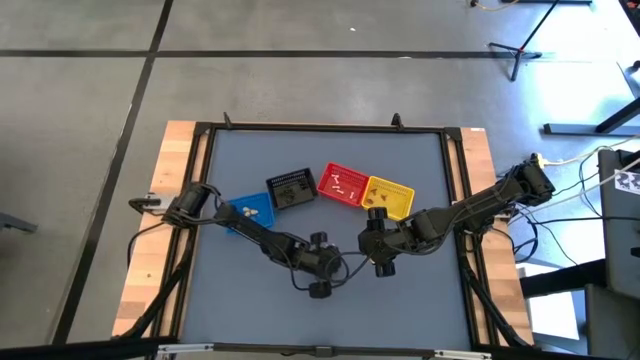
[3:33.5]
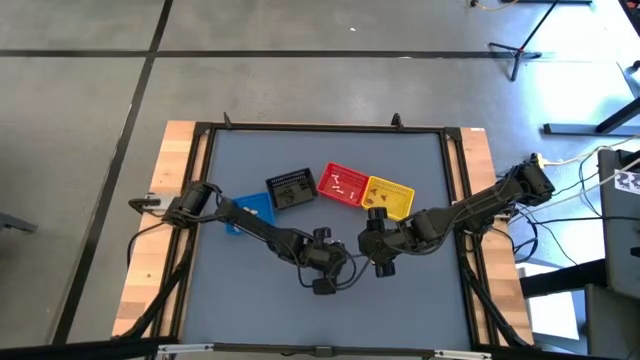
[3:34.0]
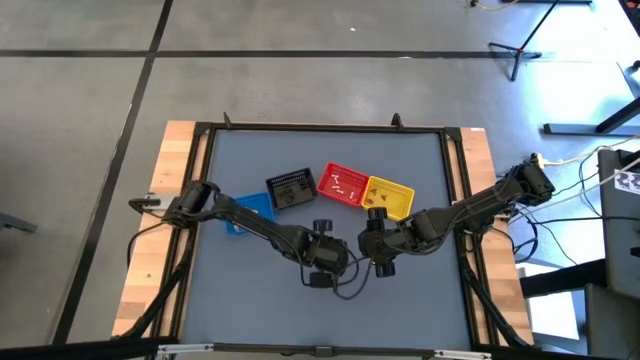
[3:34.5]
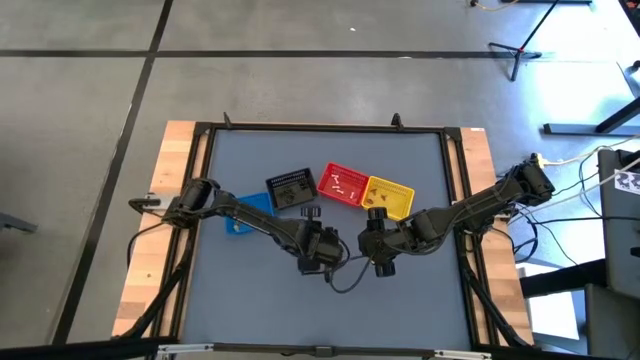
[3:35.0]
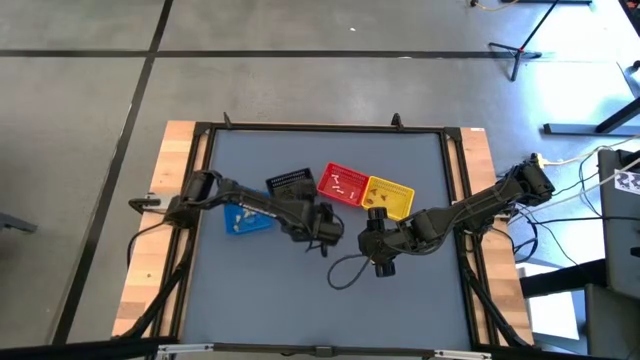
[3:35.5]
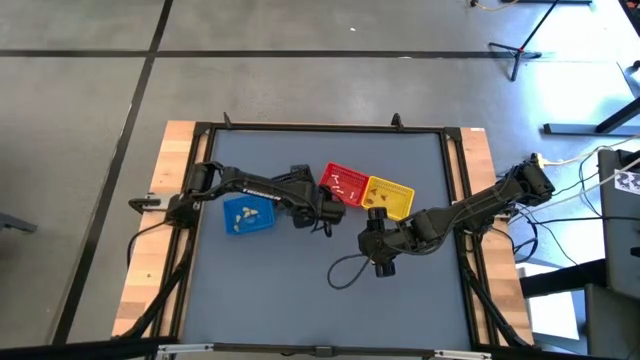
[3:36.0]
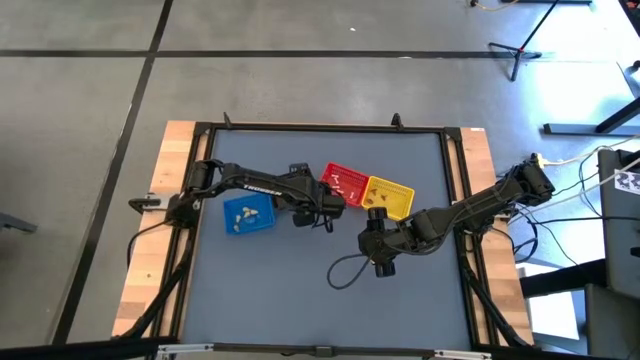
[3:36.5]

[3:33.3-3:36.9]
Task: Sort Halloween decoration
Put the black spider toy into the black bin

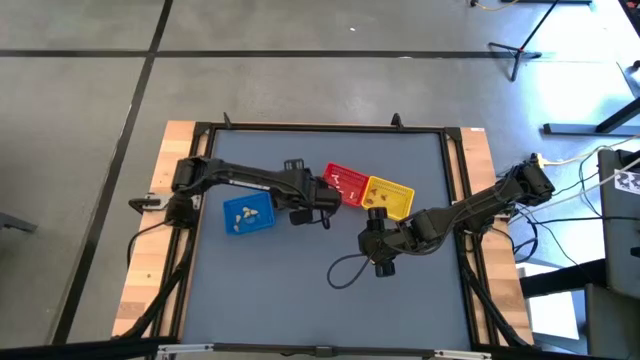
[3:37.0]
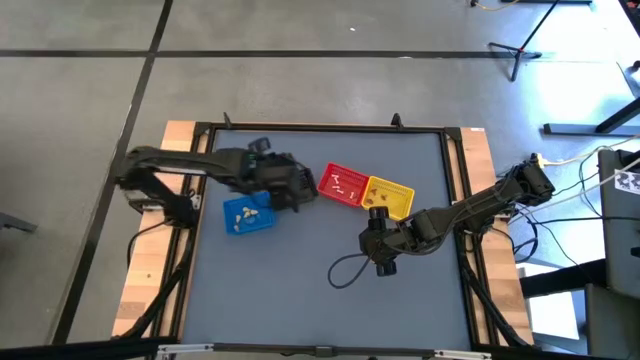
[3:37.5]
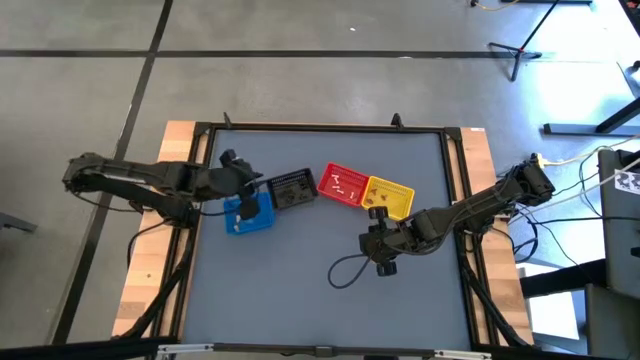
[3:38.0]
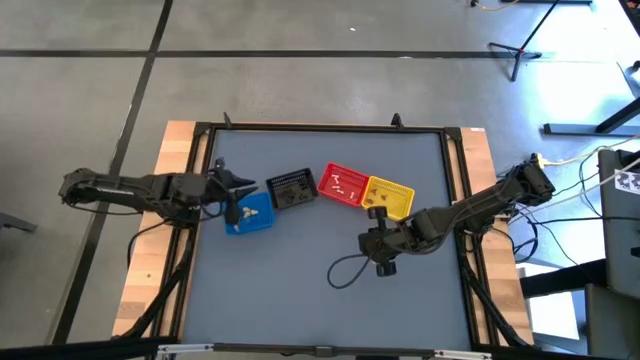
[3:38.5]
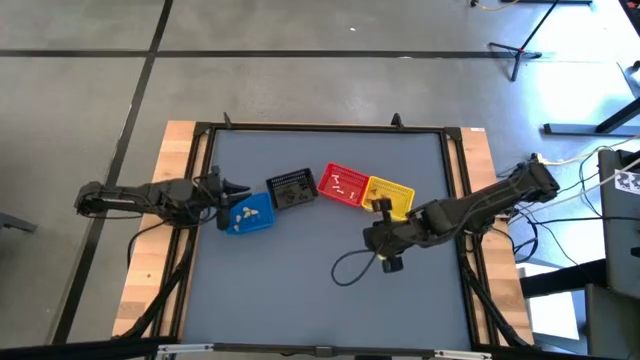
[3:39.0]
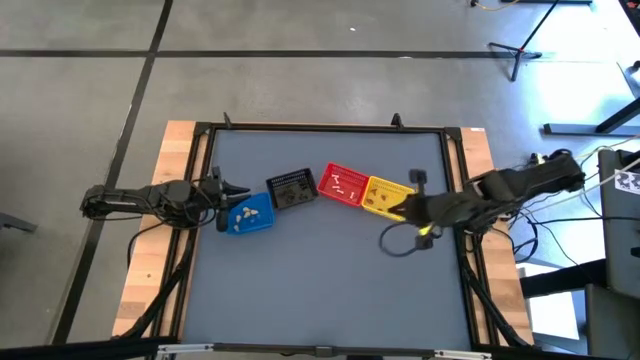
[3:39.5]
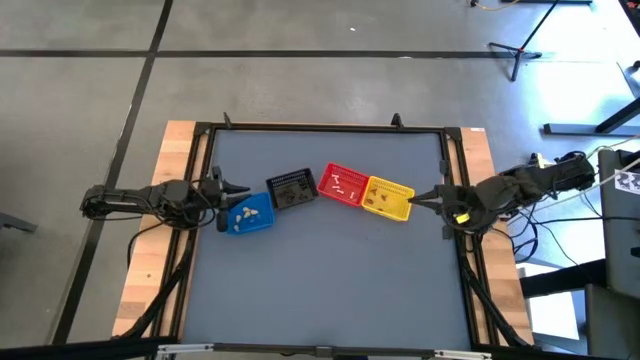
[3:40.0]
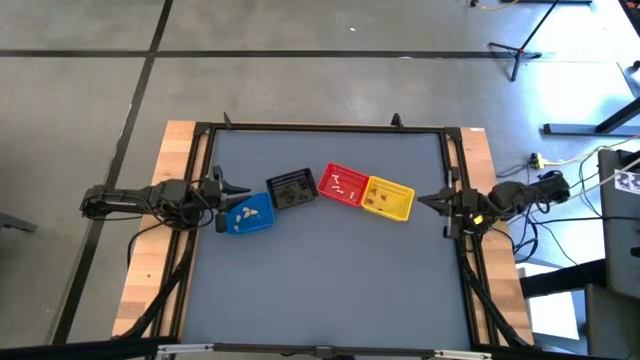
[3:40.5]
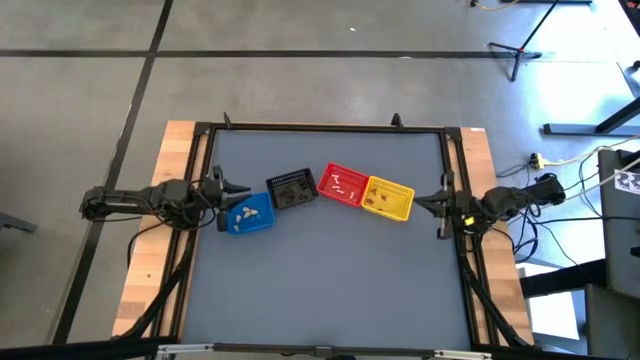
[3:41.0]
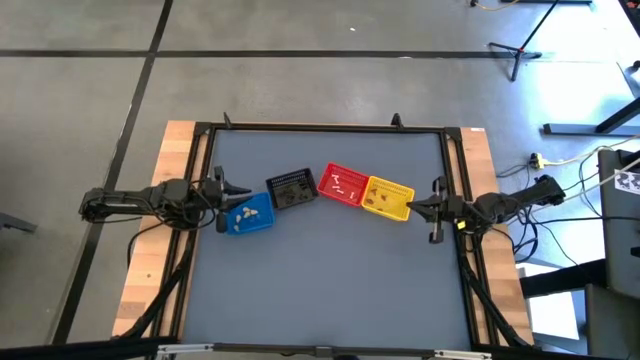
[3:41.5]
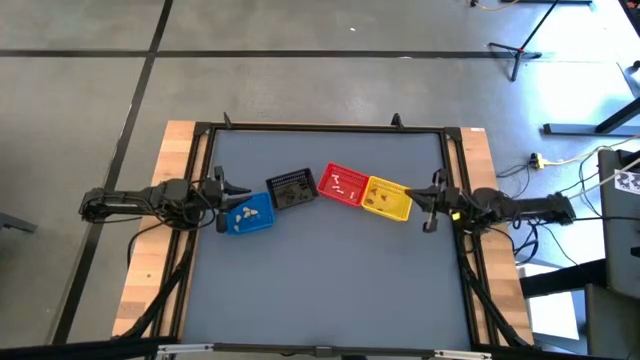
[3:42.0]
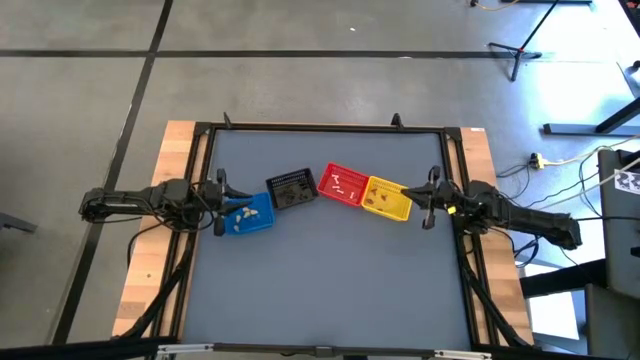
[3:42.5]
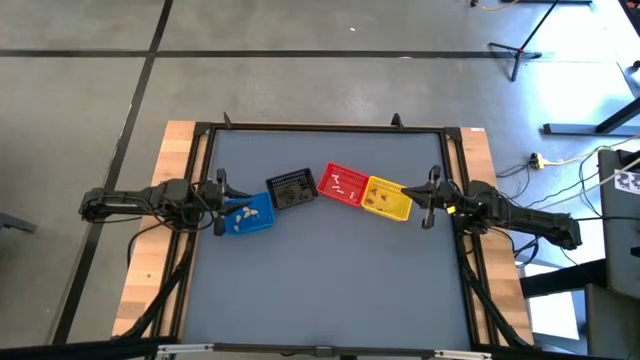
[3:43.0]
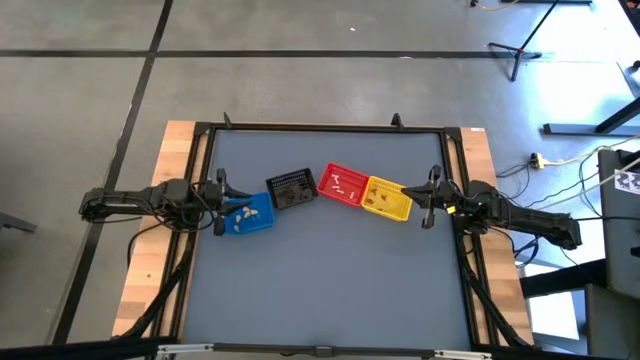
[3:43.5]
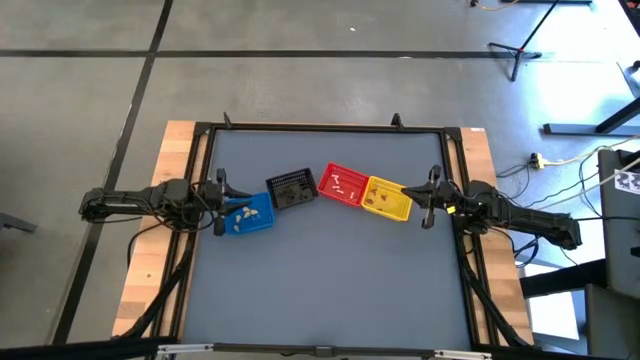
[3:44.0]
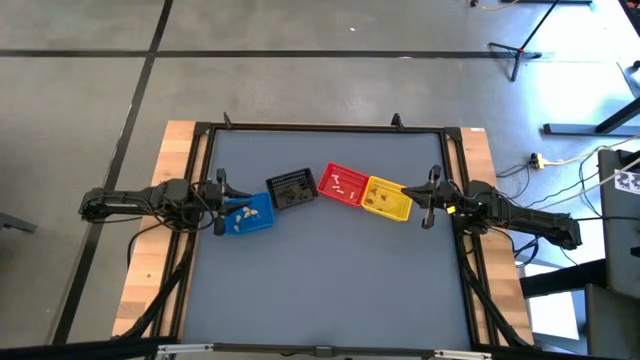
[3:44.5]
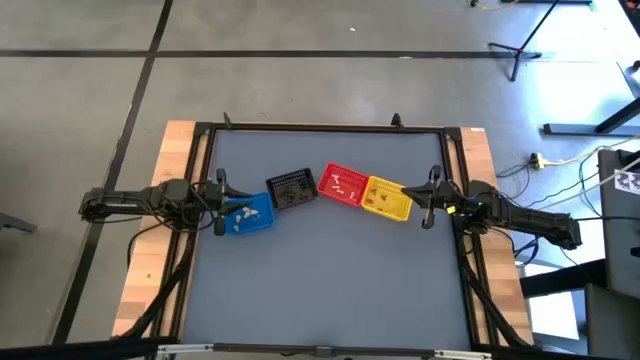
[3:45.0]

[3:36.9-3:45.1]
Return to Home Position
